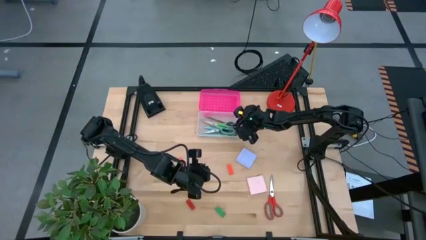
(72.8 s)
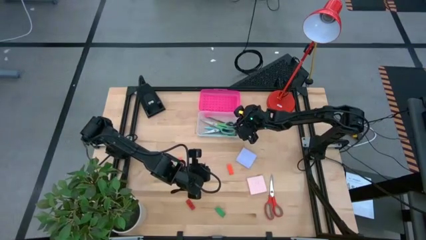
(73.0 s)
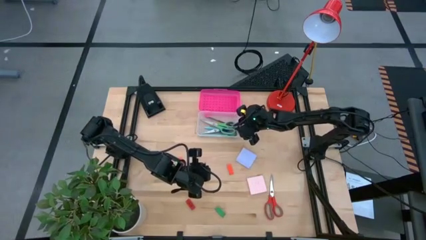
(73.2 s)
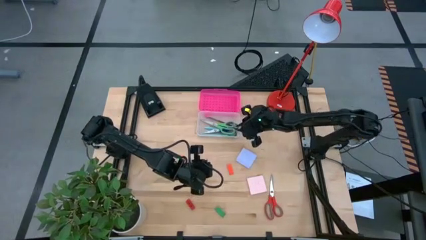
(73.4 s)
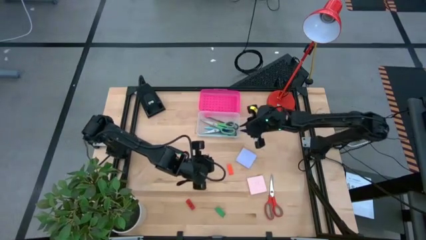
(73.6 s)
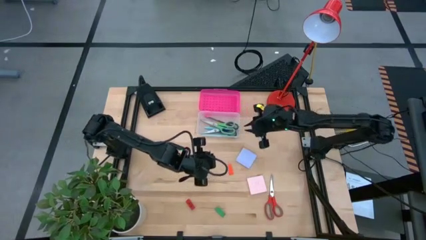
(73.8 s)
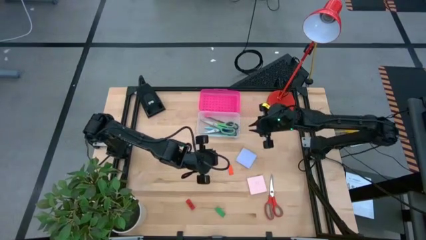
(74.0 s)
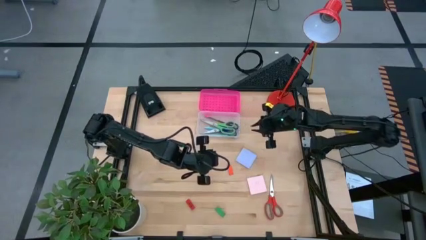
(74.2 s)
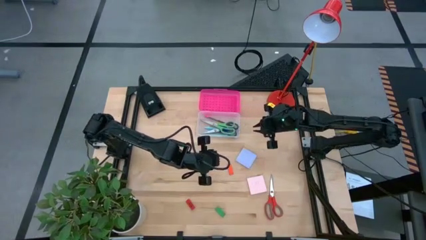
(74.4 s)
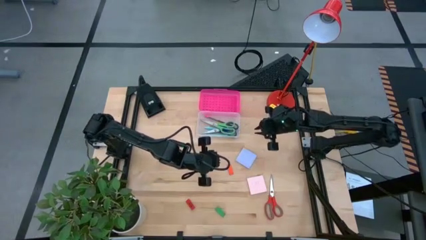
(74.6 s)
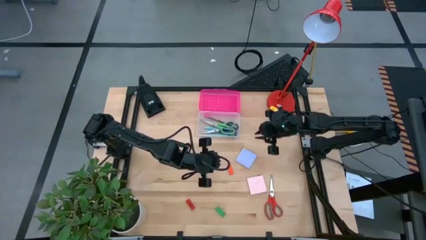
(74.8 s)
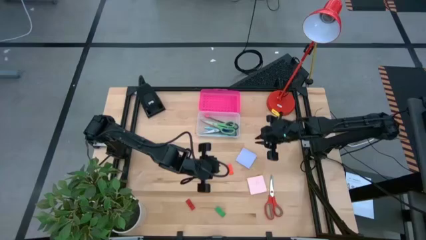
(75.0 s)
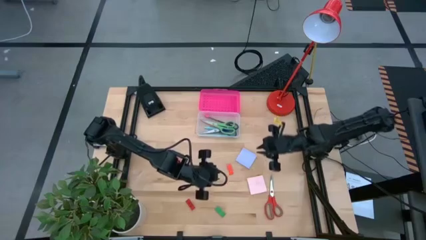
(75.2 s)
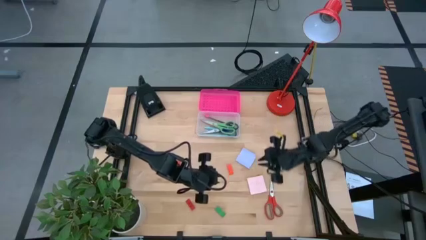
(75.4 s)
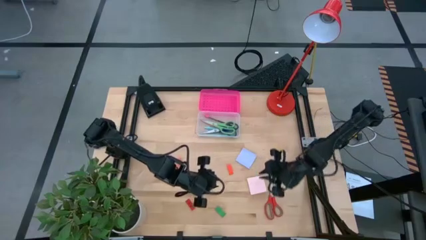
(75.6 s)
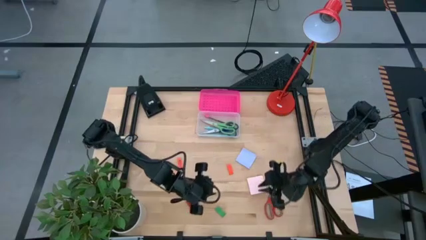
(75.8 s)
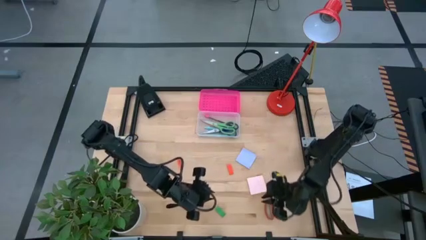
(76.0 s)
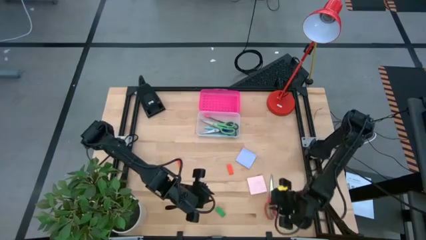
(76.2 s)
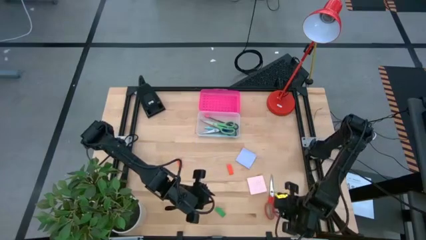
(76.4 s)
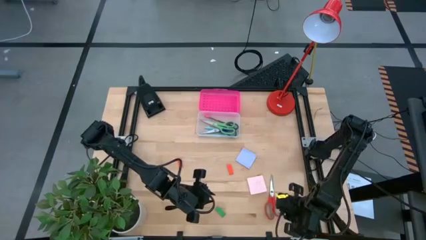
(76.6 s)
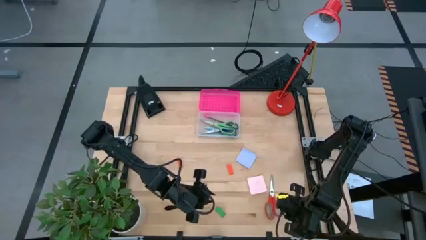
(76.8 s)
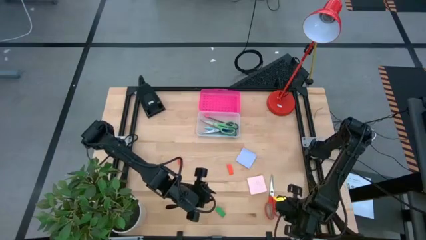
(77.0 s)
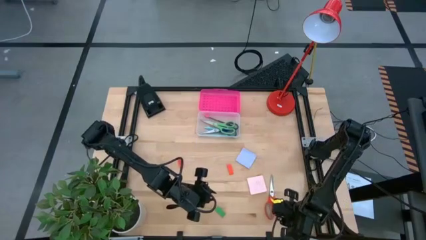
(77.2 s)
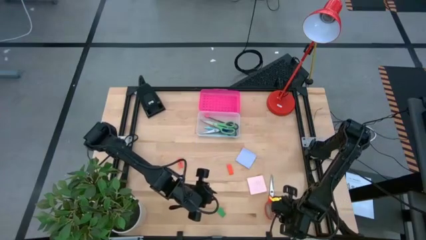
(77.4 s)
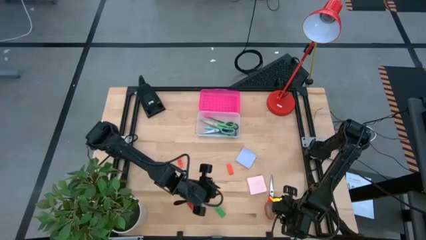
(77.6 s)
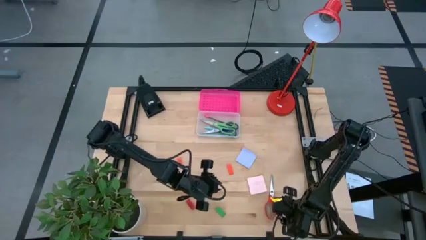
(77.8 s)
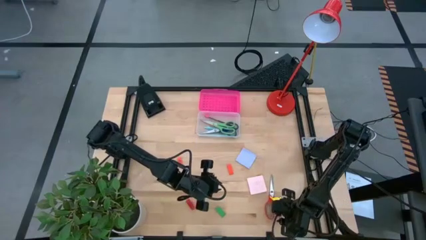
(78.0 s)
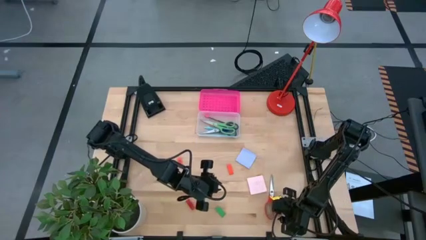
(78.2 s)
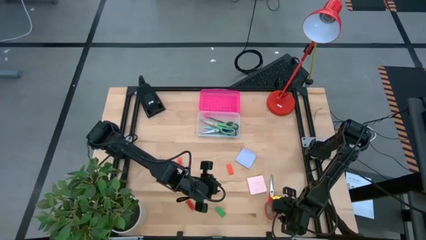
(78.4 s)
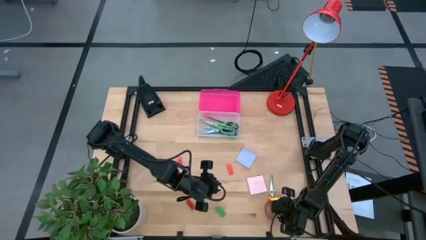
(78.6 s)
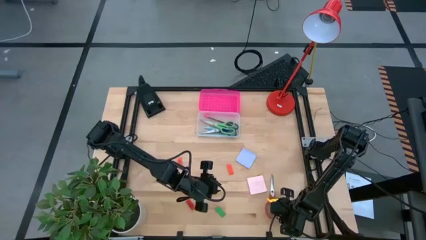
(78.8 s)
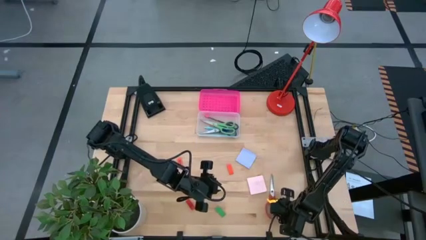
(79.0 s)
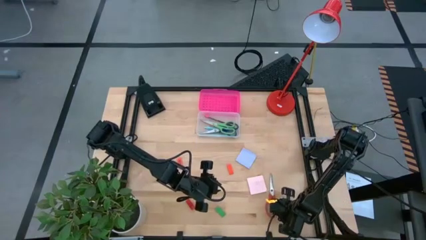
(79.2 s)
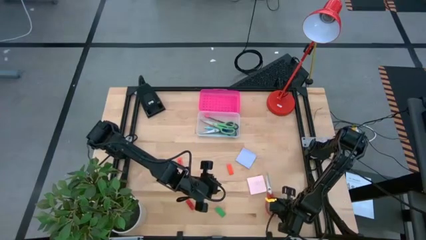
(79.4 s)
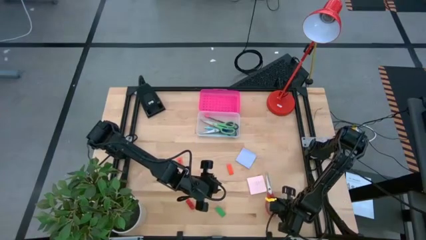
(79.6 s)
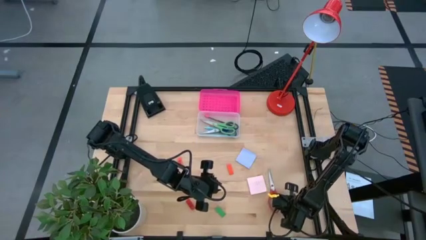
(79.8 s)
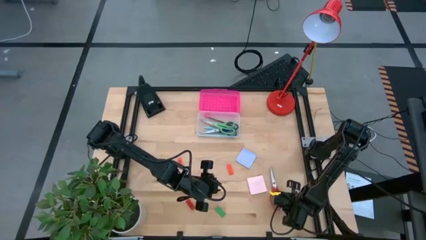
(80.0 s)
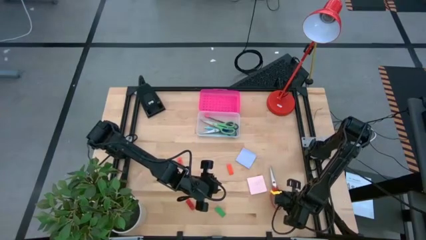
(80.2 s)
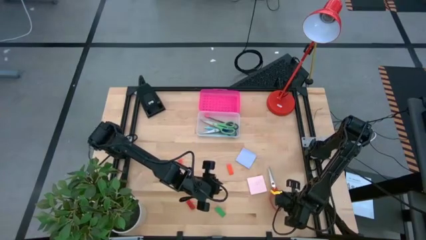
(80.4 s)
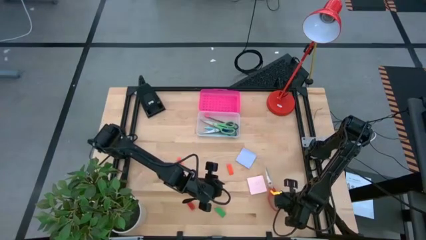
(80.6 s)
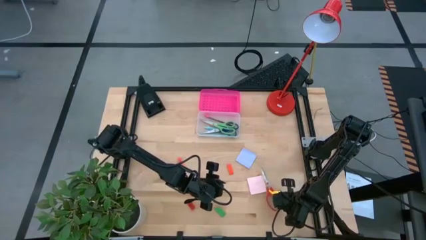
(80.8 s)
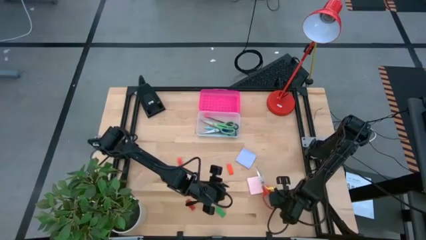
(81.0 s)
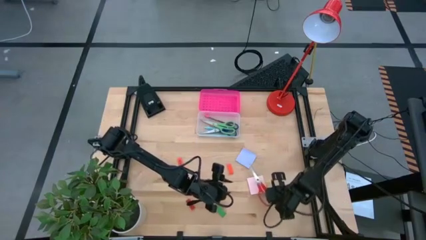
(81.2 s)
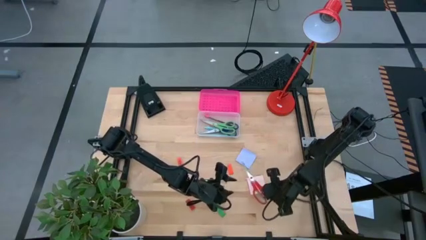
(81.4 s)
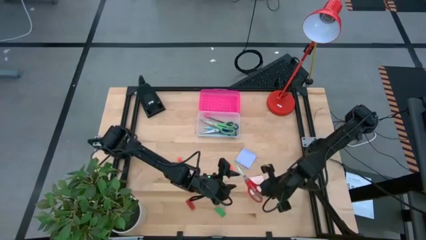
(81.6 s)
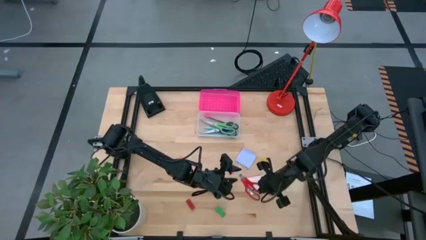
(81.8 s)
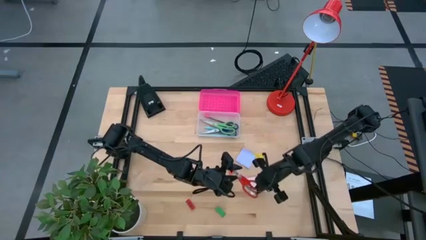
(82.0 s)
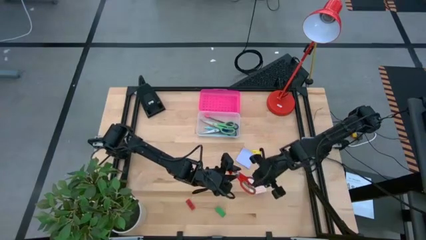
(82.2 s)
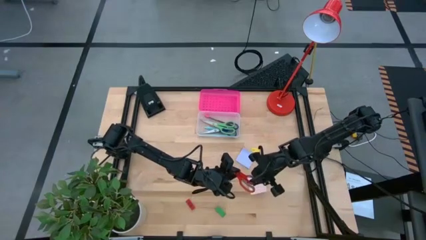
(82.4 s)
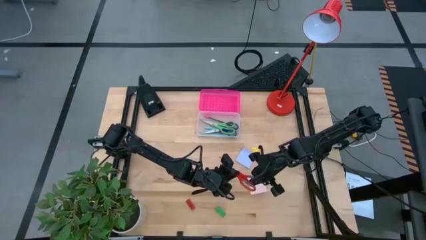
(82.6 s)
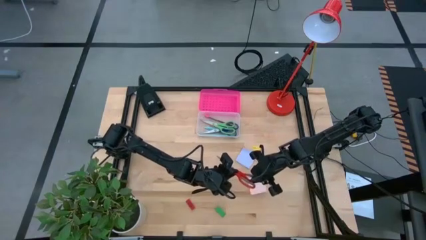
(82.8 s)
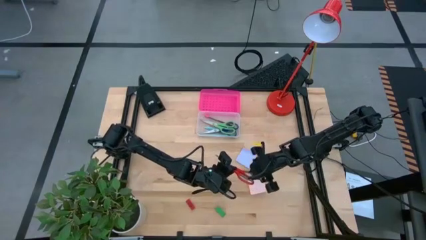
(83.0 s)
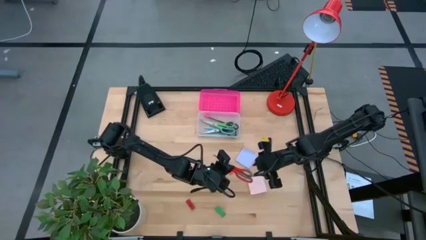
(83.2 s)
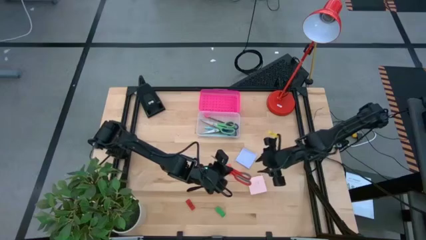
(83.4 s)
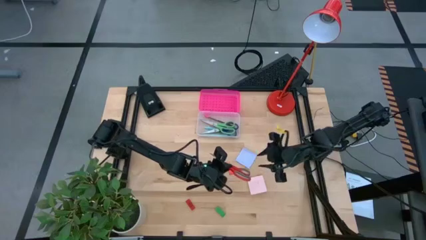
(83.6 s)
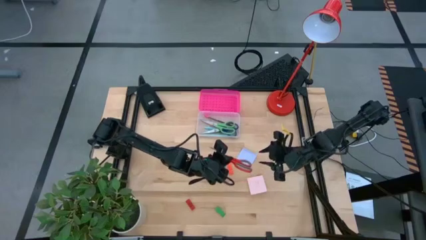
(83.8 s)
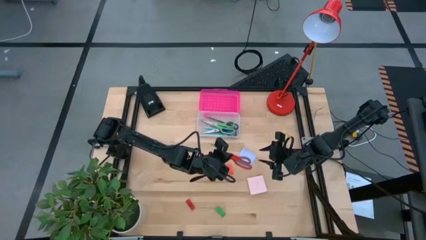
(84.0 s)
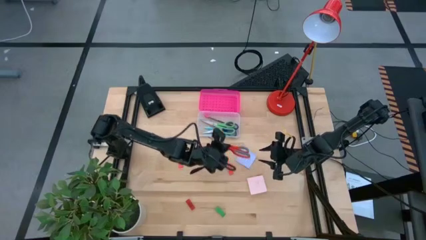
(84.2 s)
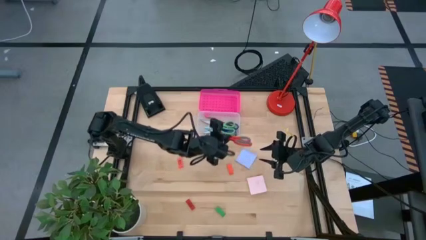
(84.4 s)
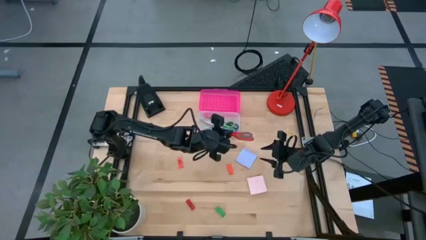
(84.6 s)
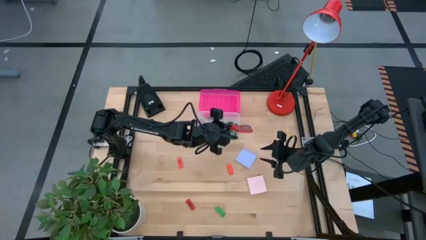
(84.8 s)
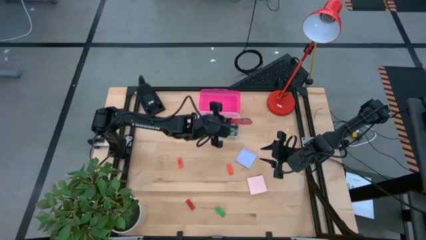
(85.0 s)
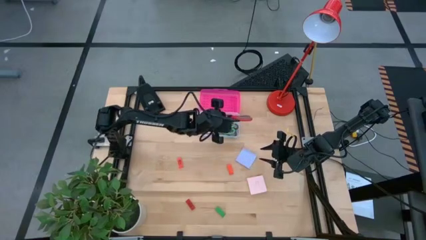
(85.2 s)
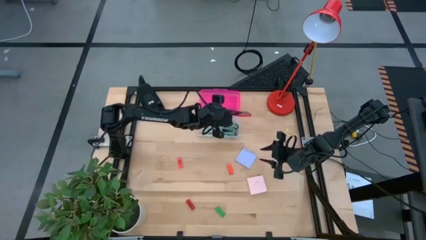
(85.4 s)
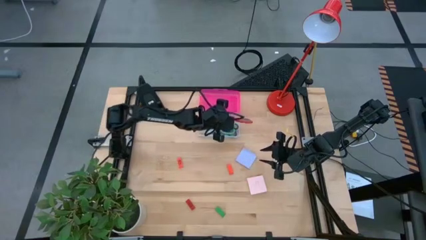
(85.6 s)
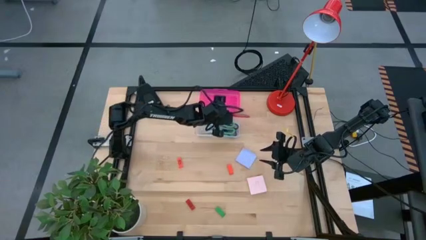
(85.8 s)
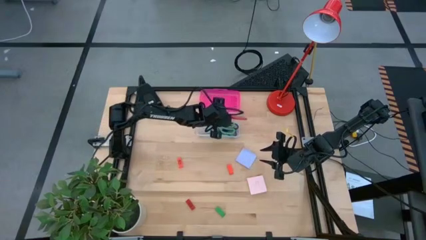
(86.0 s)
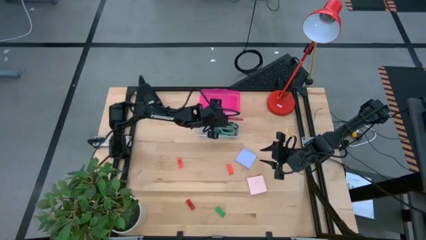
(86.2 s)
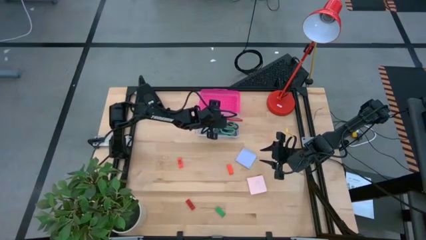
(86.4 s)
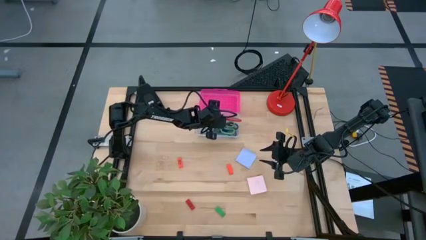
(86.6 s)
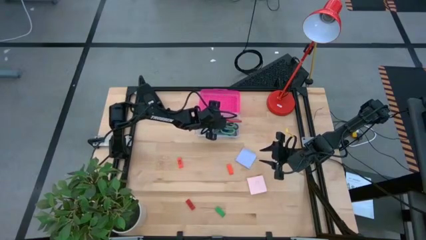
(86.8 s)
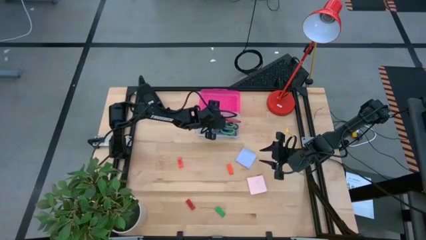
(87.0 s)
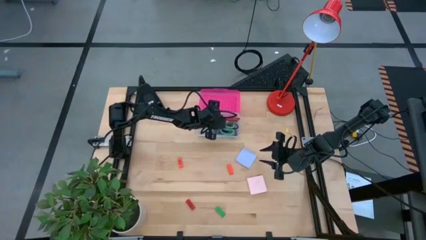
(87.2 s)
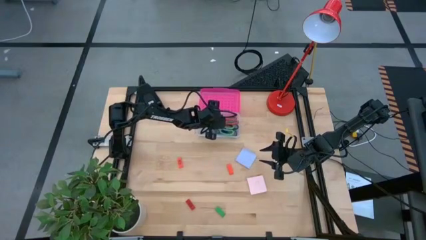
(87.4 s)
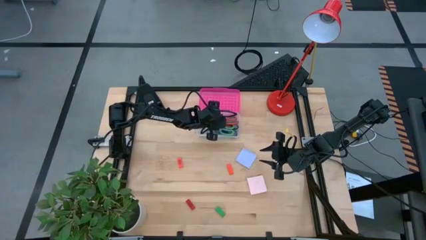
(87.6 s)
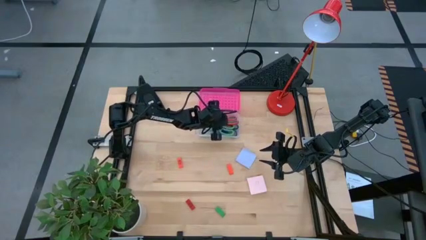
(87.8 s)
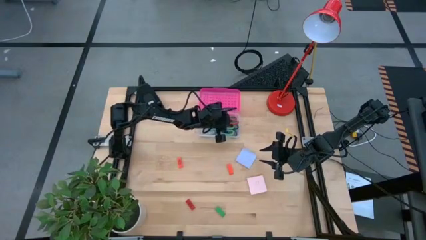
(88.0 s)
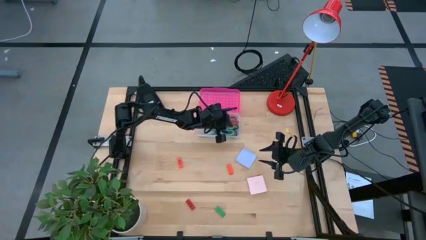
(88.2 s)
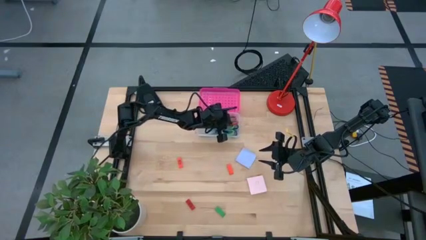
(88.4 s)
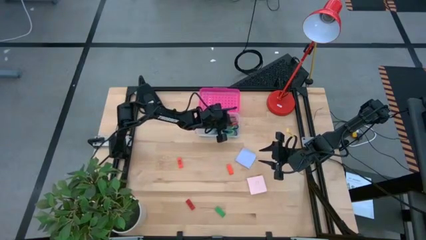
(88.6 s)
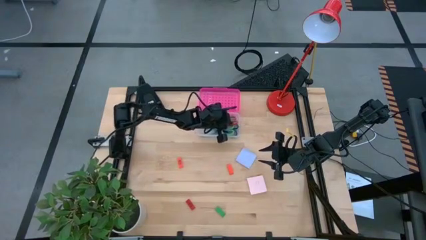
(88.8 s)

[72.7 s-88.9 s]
Task: Pack school essentials
Put the orange scissors into the supply box
